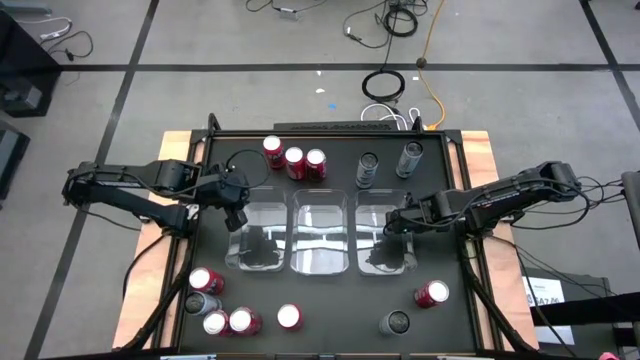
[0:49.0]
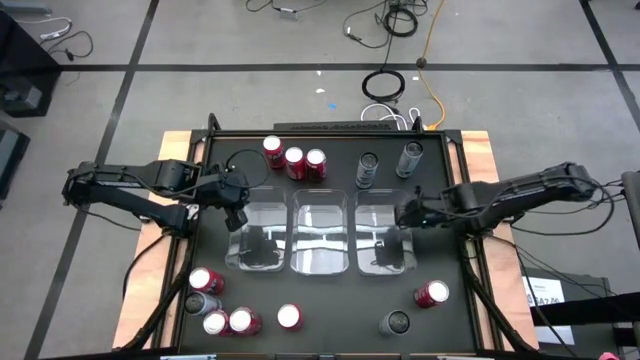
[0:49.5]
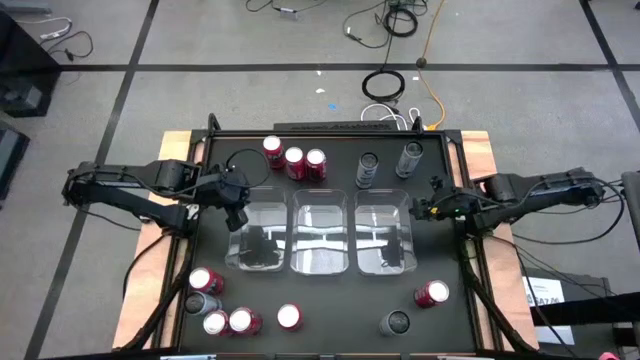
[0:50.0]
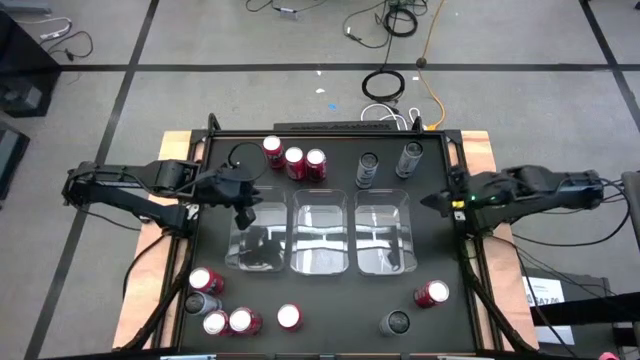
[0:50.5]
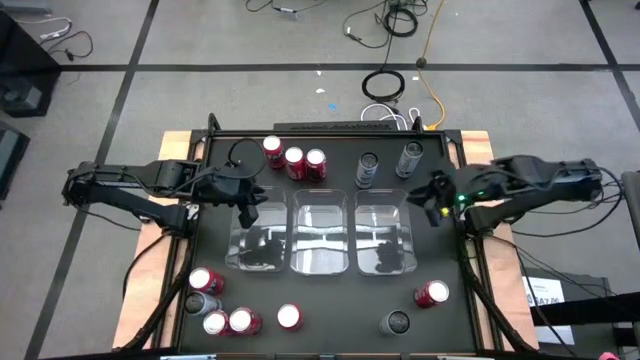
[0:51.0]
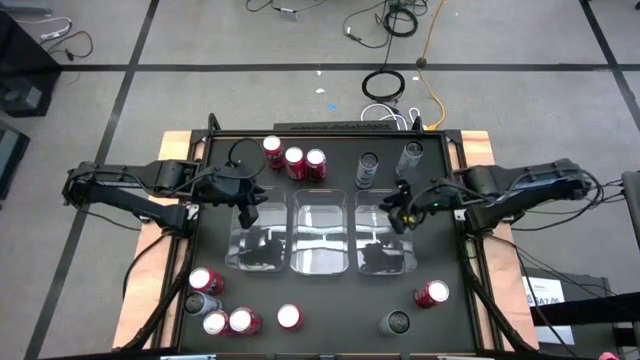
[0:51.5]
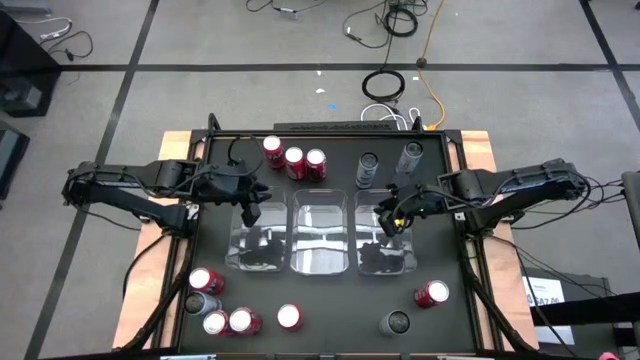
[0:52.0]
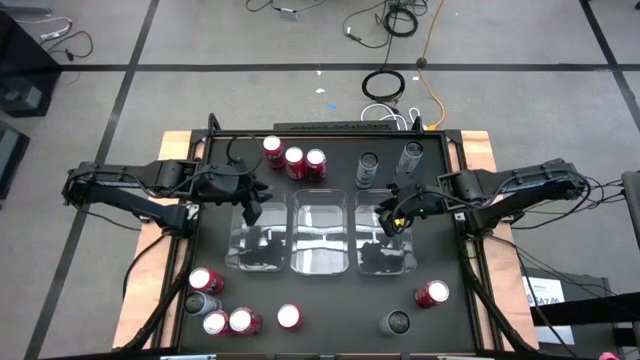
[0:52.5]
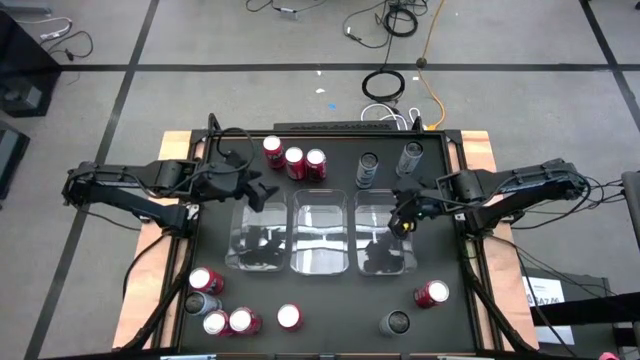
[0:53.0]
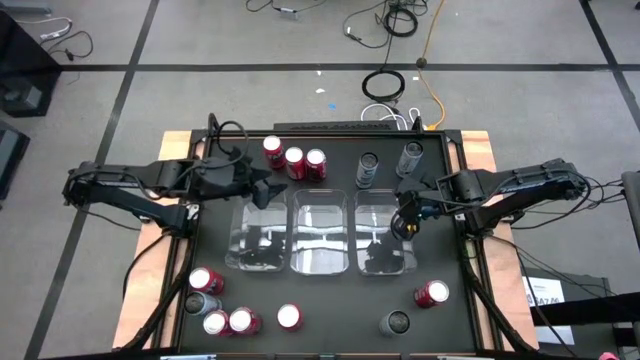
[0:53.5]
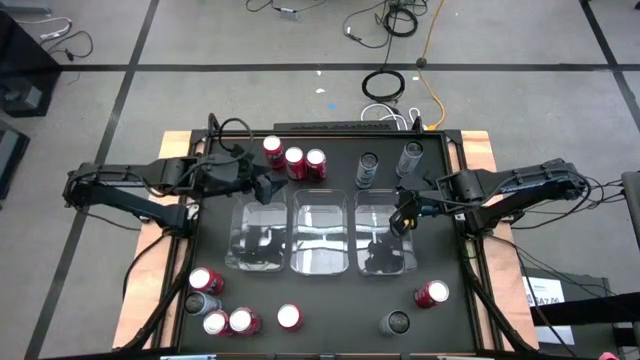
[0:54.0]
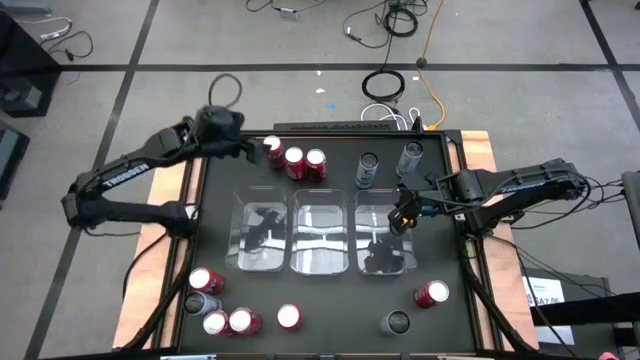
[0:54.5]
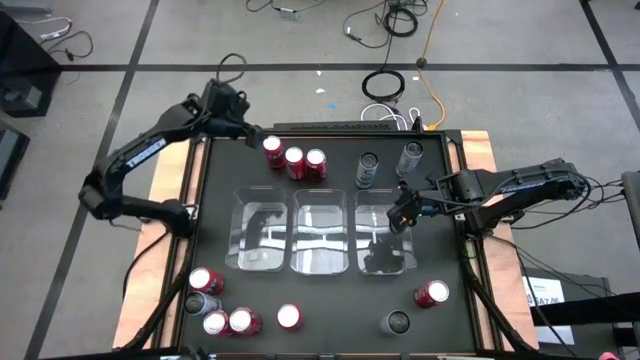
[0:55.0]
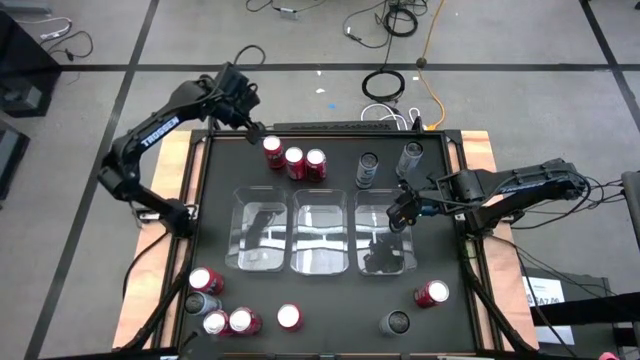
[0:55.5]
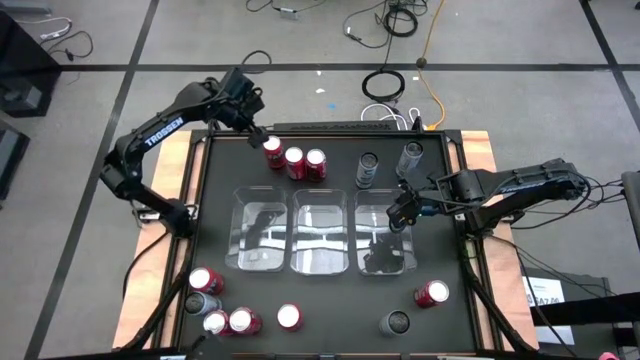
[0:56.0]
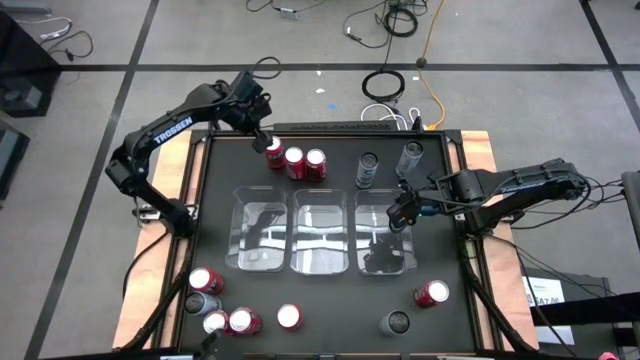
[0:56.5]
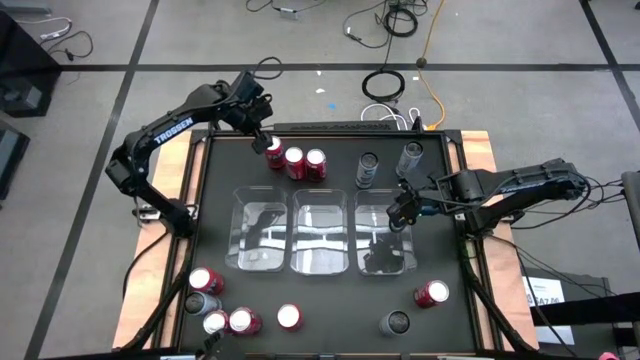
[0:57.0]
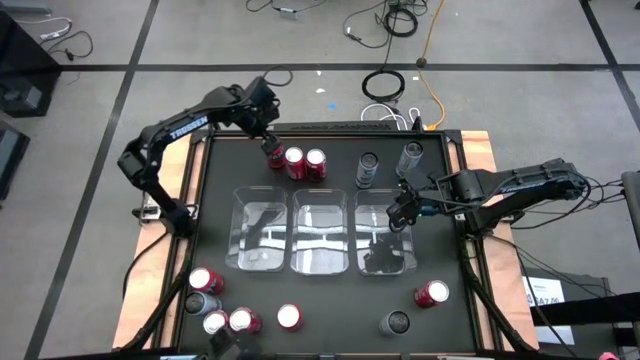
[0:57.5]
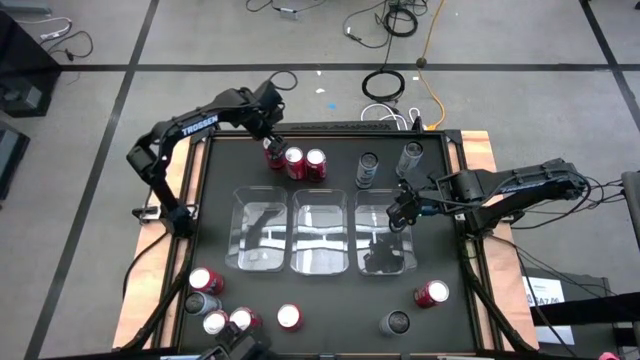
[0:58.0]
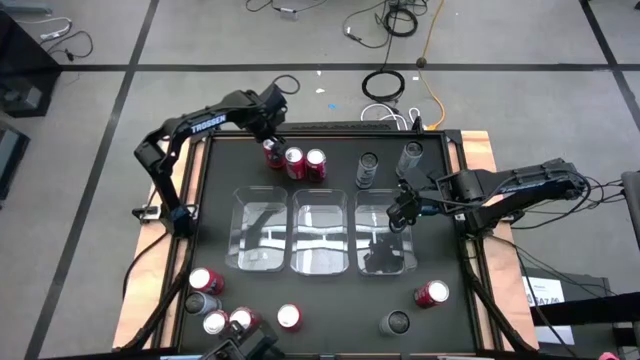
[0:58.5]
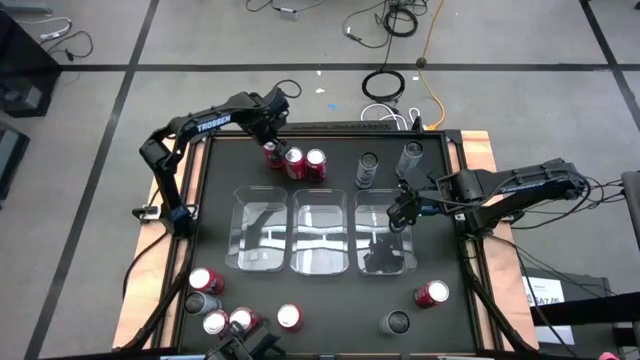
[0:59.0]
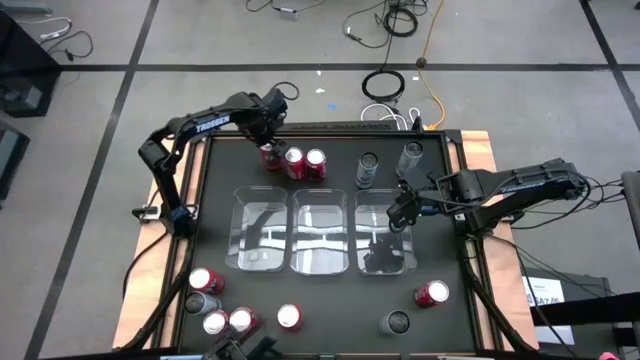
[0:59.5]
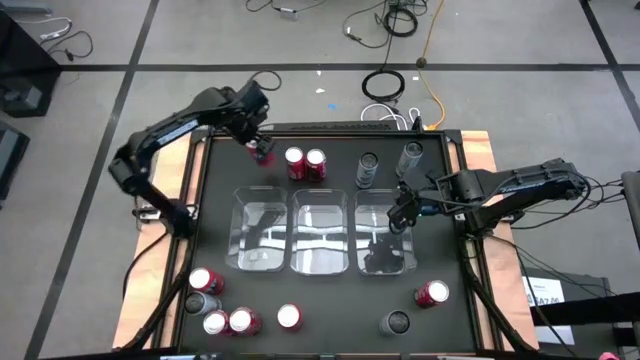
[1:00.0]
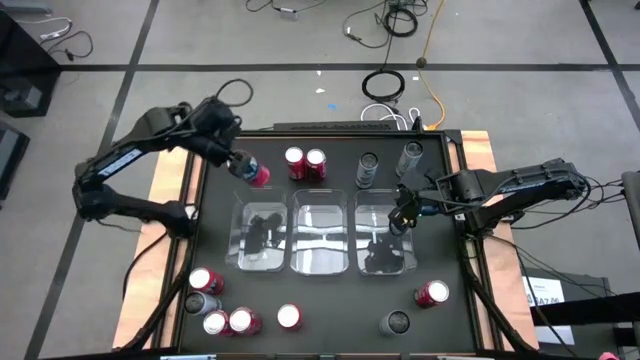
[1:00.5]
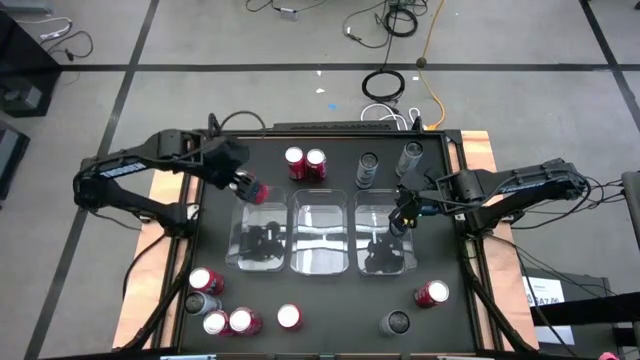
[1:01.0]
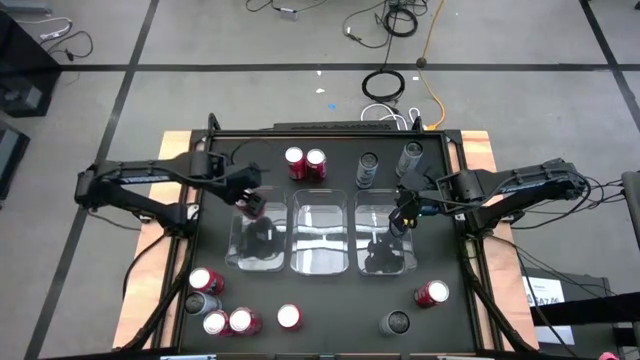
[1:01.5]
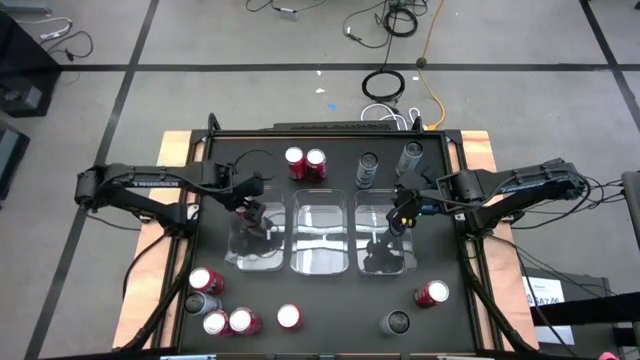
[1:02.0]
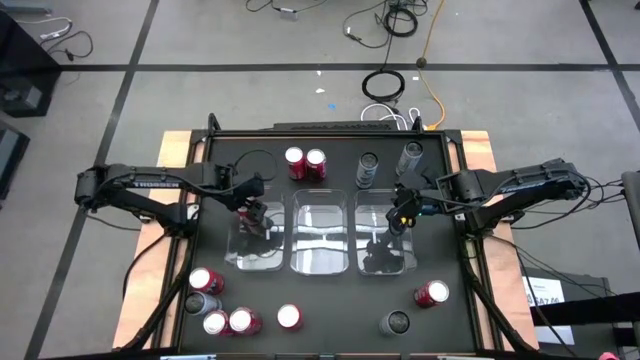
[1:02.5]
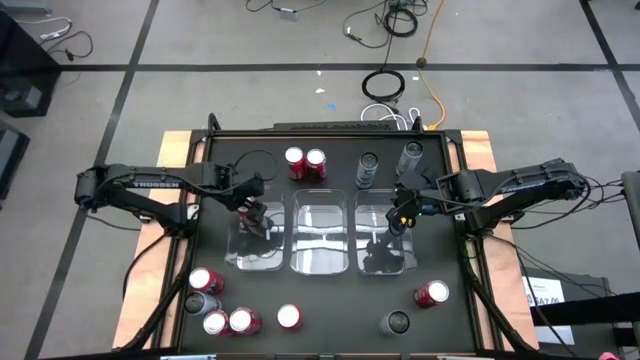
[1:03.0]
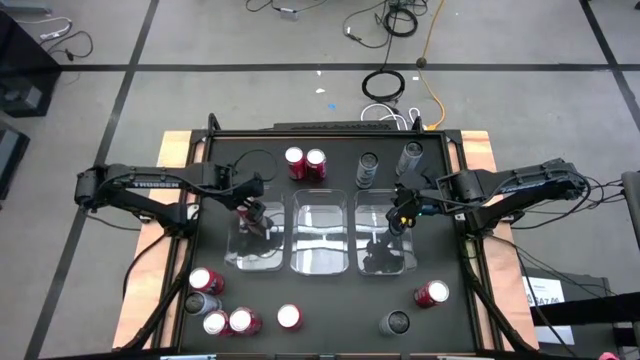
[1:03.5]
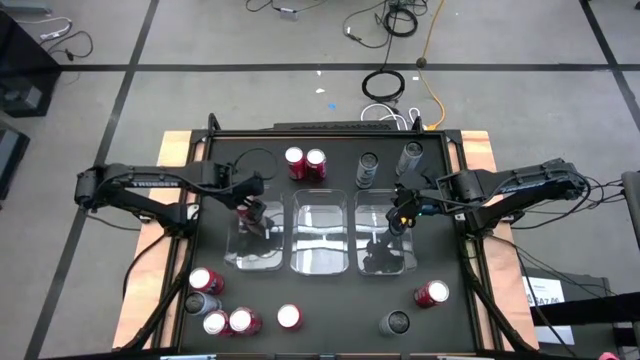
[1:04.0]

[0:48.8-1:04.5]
Task: Sort soda cans
Put the top left red soda can into the left transparent bin

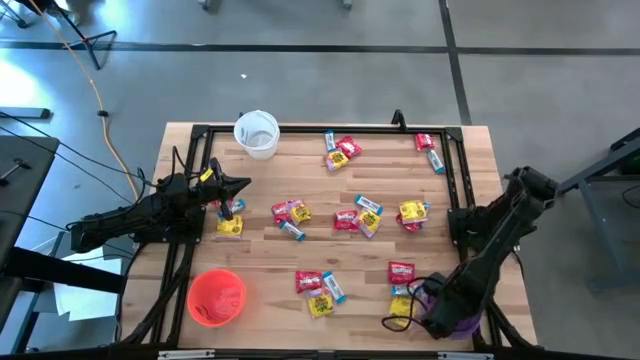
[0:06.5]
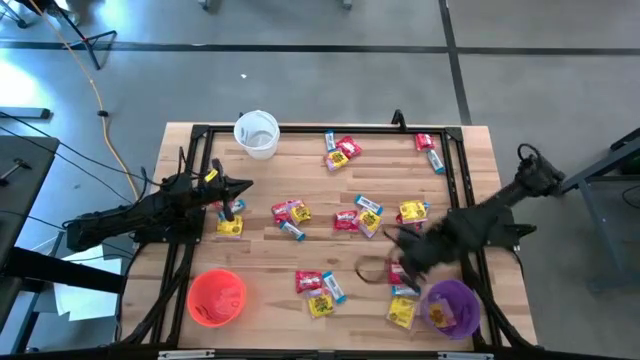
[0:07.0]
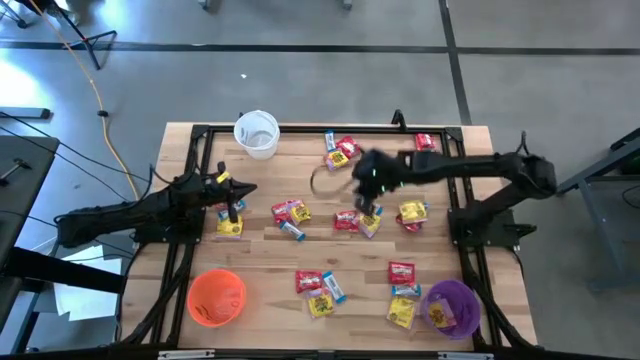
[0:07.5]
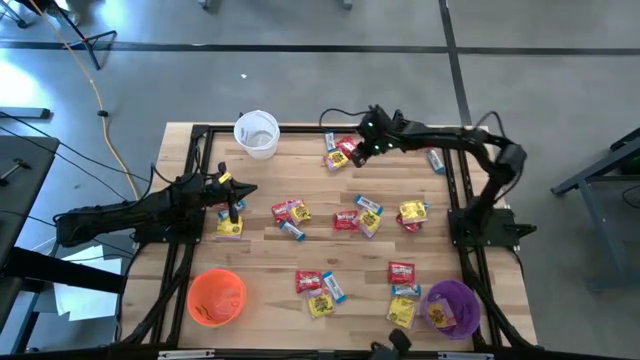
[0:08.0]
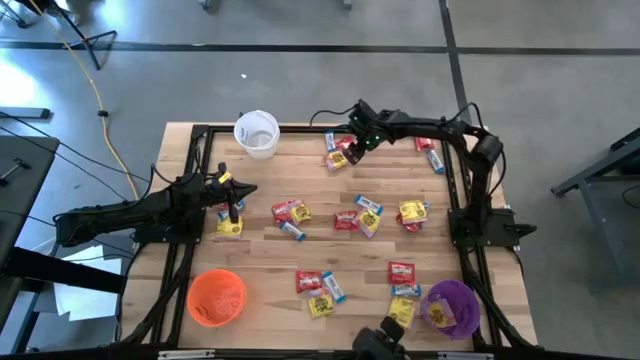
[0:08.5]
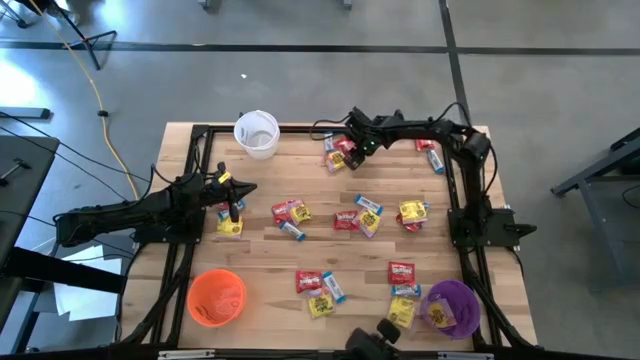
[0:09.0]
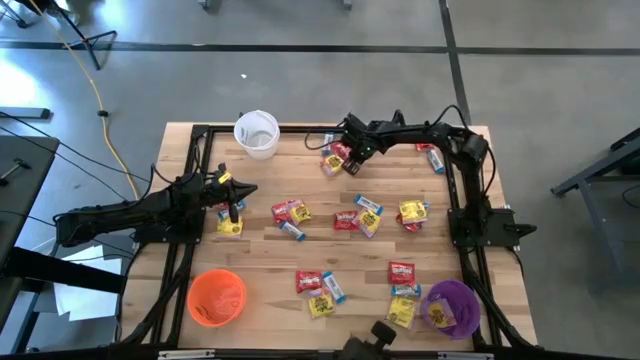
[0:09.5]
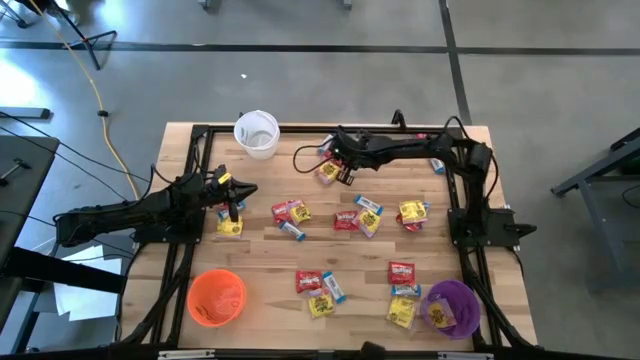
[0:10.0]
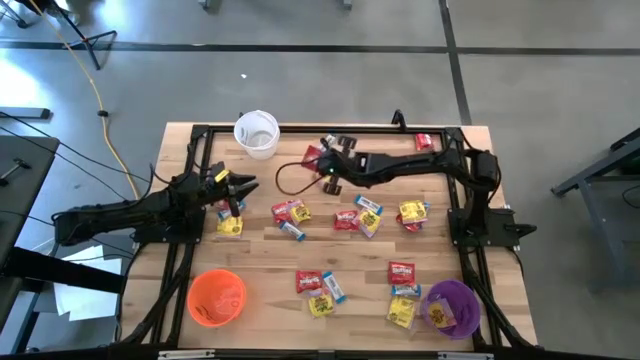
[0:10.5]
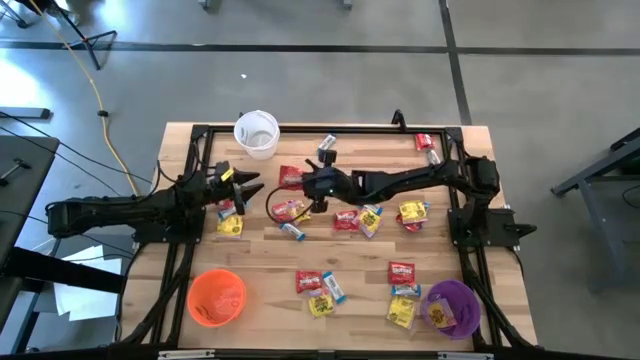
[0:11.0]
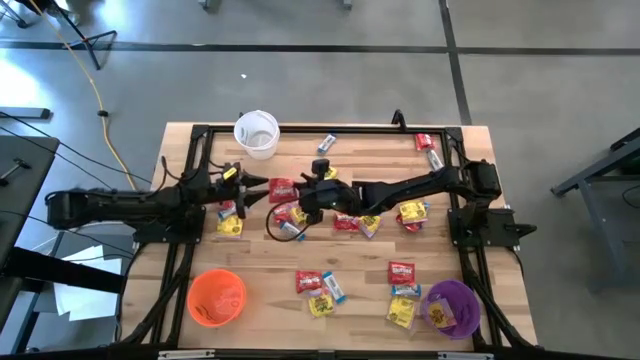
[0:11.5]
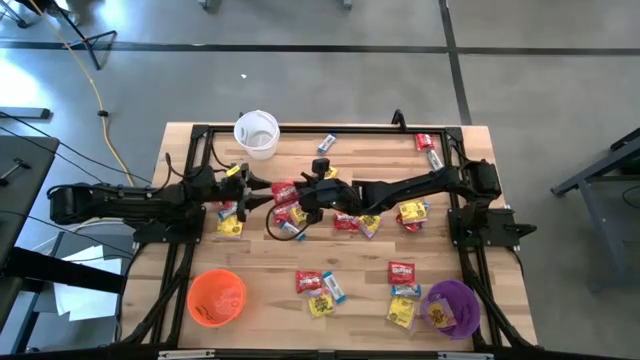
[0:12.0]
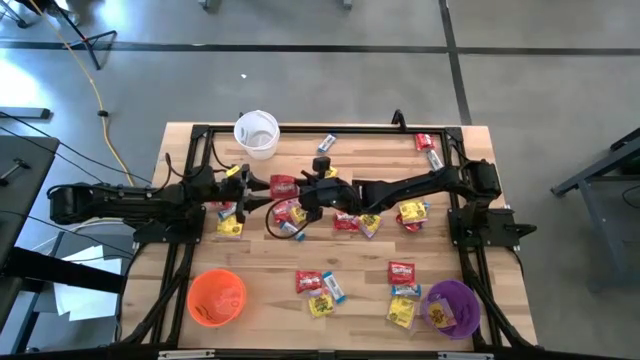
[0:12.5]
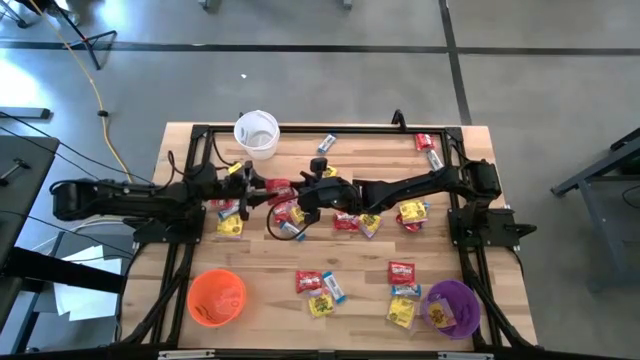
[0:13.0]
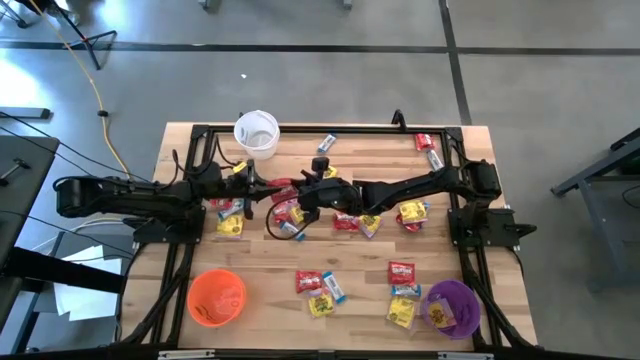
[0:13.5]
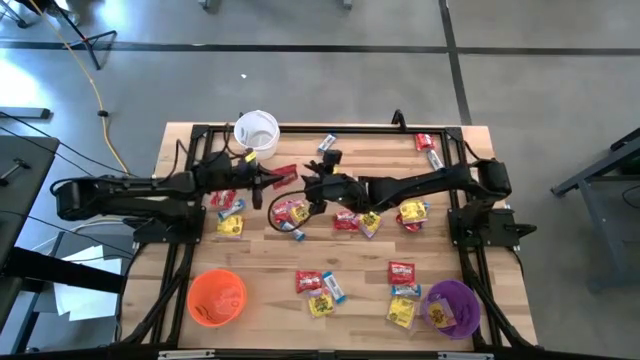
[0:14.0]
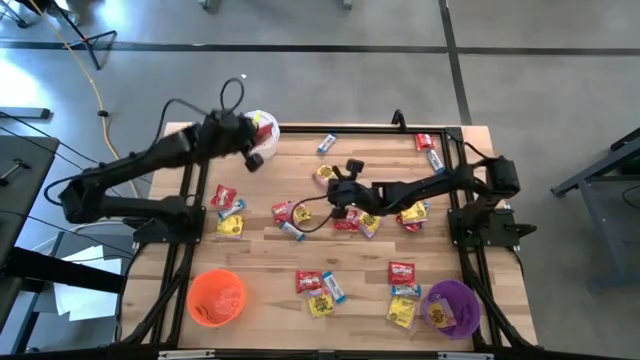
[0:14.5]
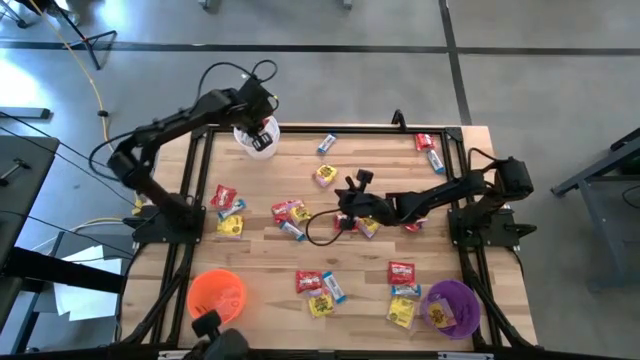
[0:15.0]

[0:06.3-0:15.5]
Task: Sort candy
Put the red candy into the white bucket
